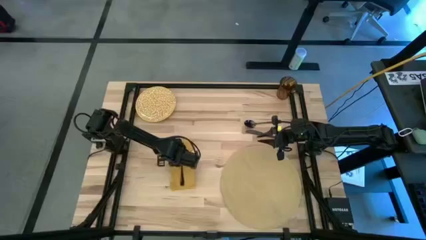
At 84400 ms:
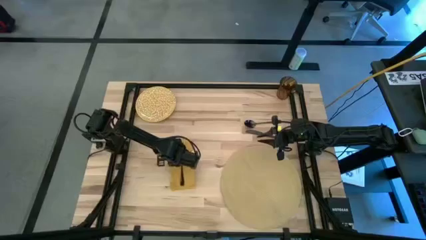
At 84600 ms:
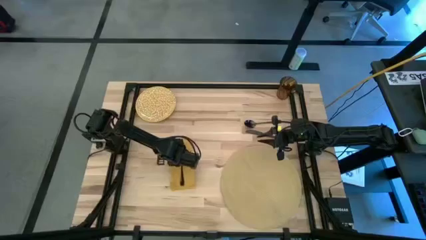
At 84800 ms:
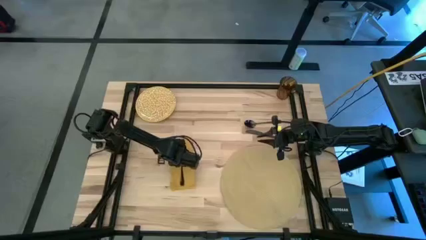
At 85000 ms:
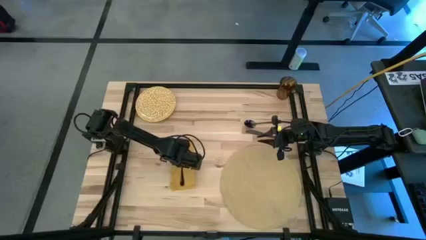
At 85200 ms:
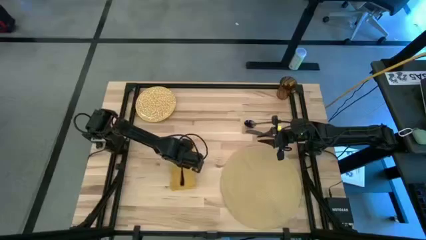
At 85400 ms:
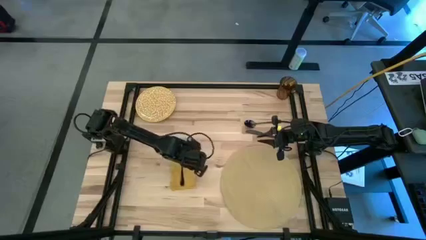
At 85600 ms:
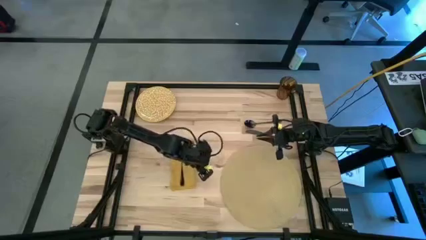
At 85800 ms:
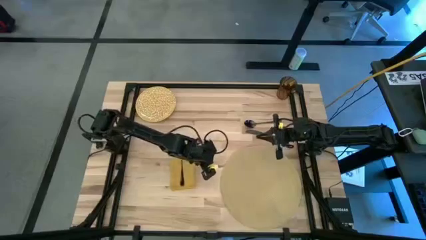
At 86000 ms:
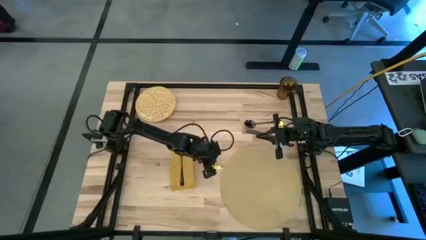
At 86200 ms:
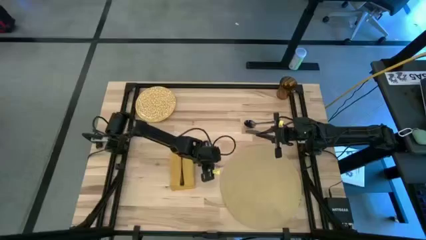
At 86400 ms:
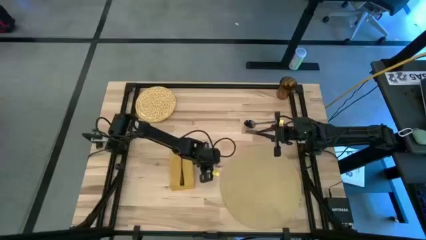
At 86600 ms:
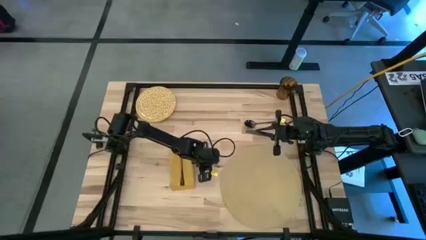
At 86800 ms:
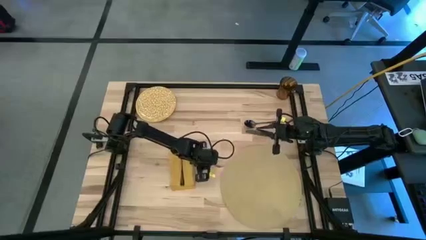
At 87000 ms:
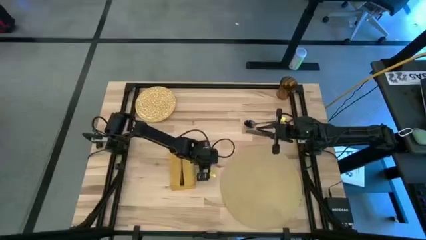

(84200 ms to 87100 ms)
Task: Set table place
Move the yellow placemat to the right of the yellow table napkin

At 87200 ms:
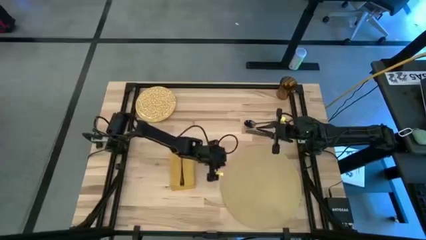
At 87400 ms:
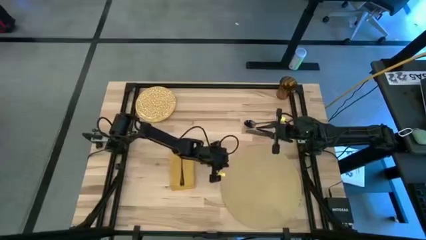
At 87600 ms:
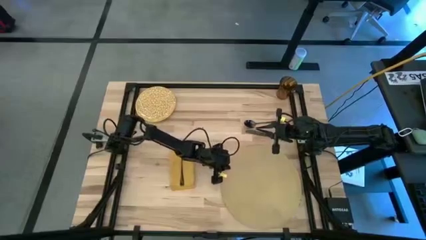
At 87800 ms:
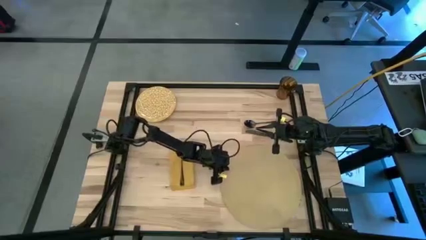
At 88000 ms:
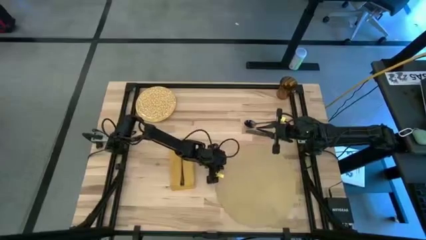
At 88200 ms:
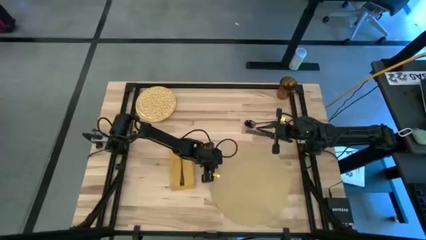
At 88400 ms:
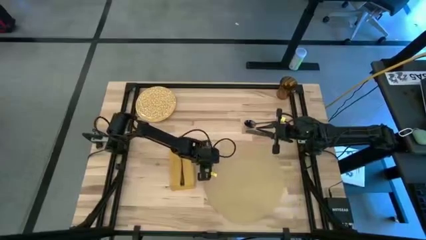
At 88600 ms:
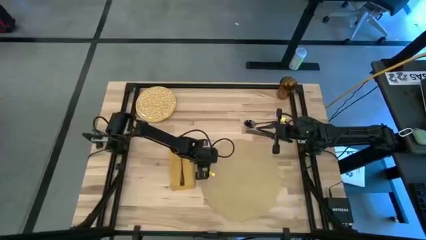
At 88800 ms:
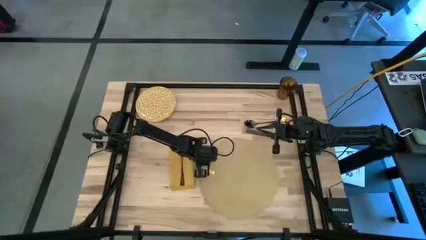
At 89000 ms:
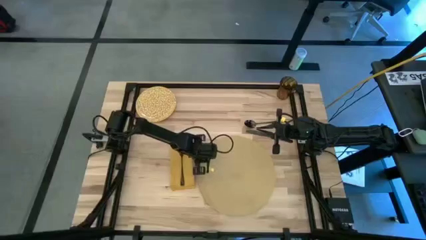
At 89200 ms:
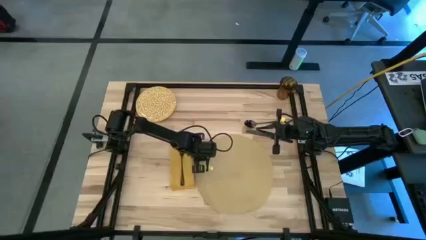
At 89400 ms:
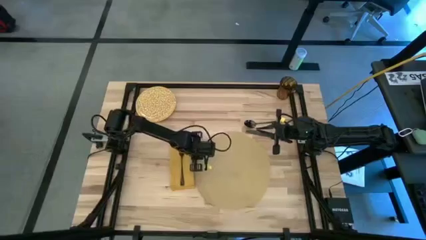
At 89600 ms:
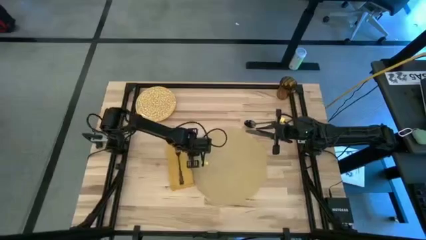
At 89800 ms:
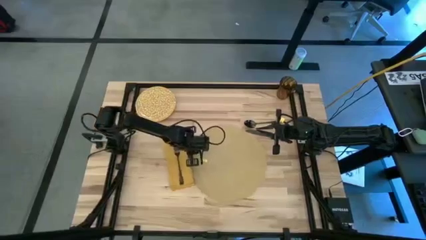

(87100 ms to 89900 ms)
Move the yellow placemat to the right of the yellow table napkin

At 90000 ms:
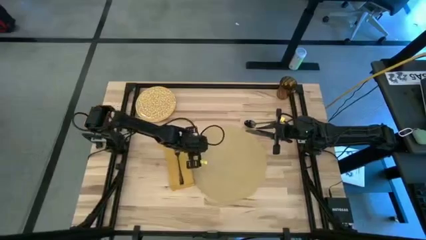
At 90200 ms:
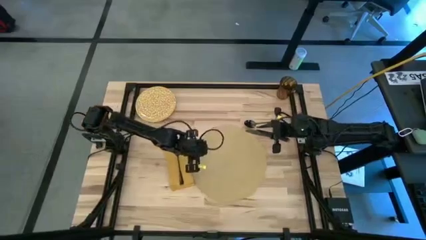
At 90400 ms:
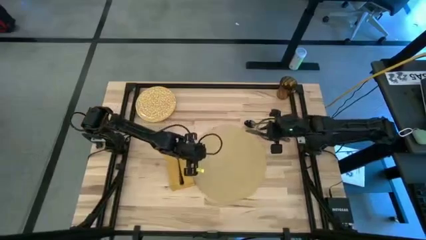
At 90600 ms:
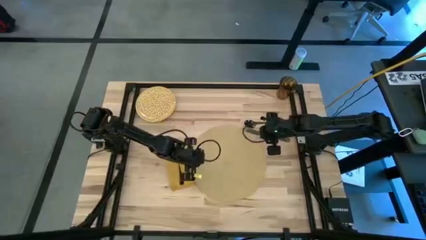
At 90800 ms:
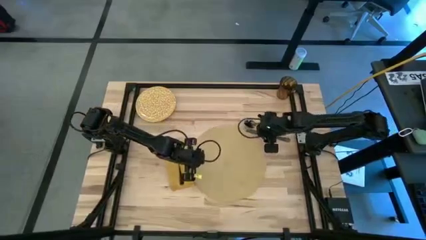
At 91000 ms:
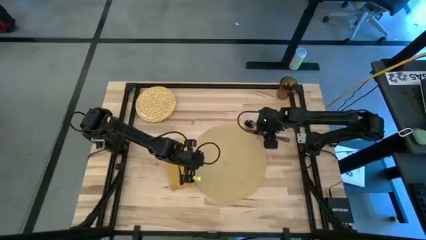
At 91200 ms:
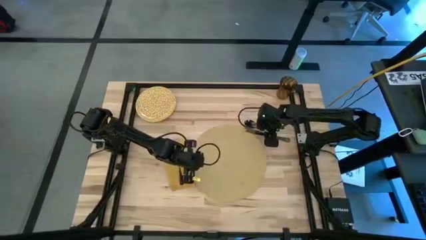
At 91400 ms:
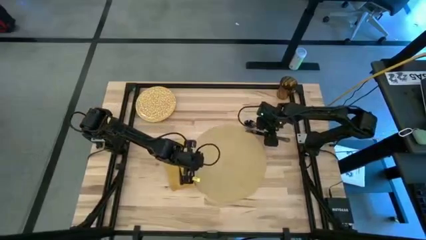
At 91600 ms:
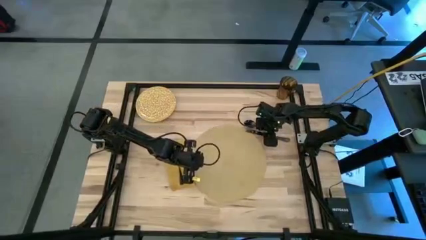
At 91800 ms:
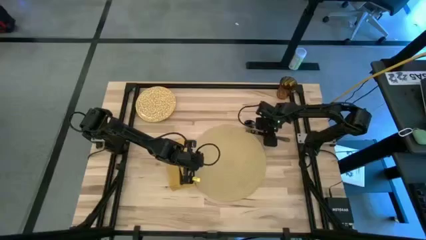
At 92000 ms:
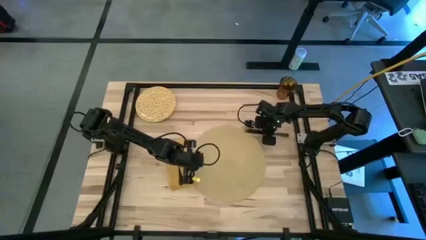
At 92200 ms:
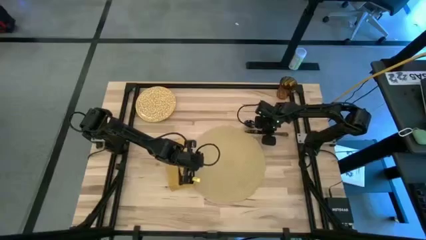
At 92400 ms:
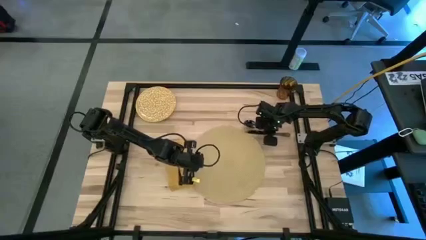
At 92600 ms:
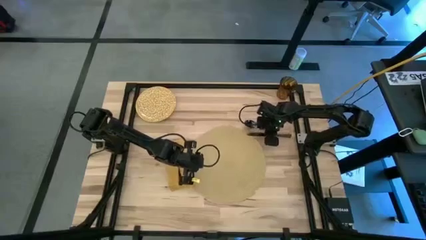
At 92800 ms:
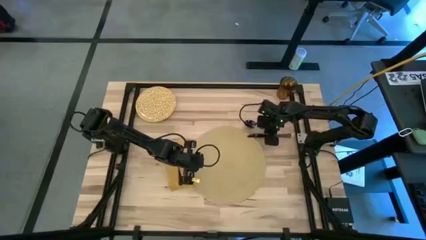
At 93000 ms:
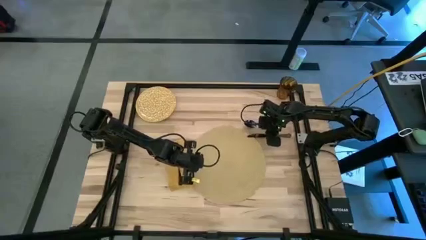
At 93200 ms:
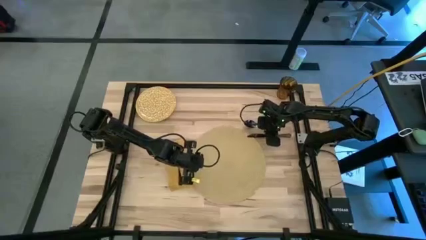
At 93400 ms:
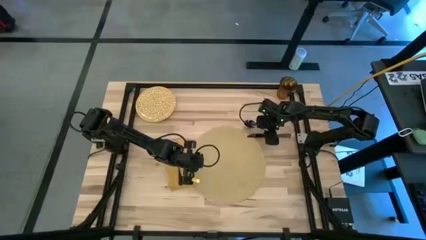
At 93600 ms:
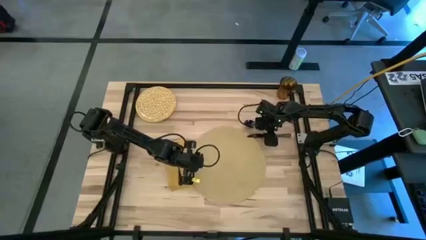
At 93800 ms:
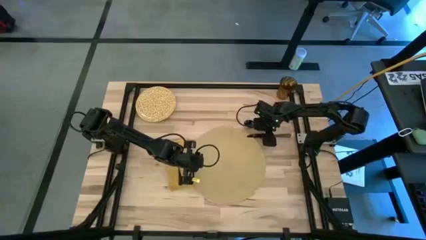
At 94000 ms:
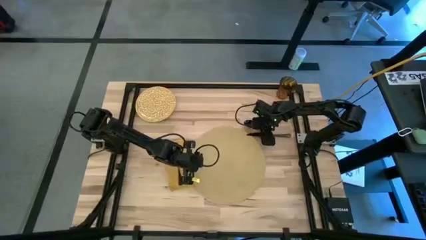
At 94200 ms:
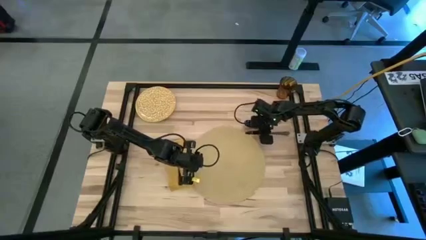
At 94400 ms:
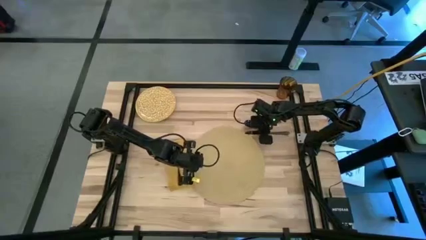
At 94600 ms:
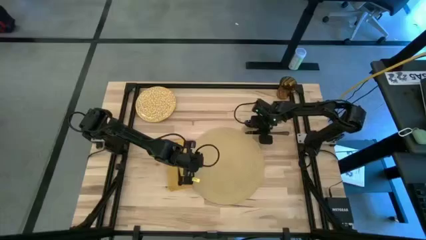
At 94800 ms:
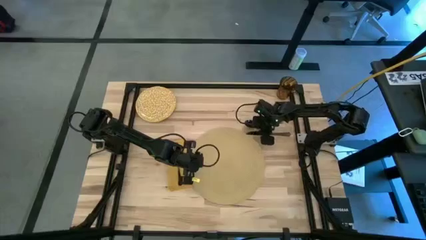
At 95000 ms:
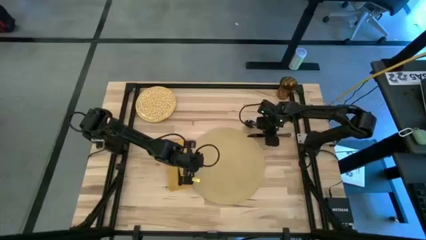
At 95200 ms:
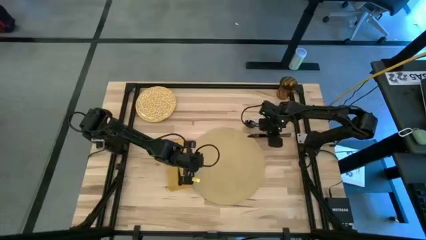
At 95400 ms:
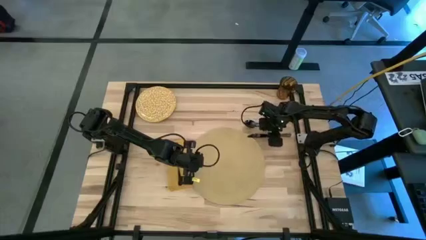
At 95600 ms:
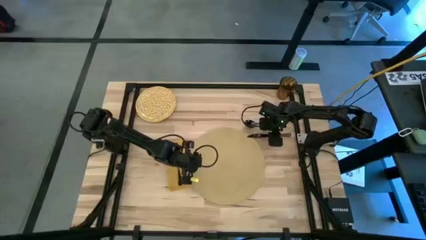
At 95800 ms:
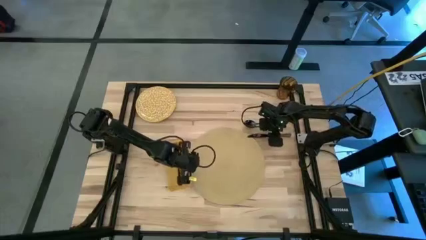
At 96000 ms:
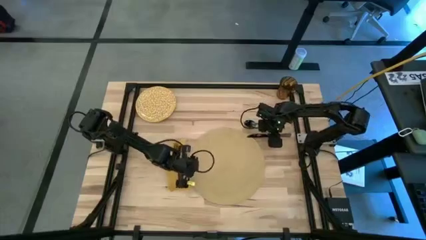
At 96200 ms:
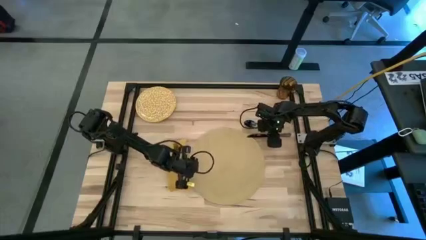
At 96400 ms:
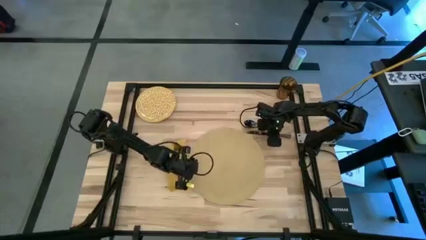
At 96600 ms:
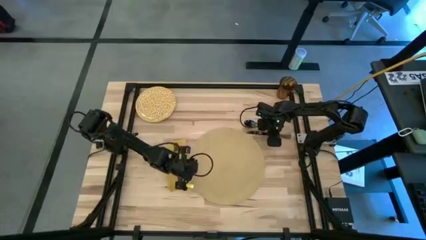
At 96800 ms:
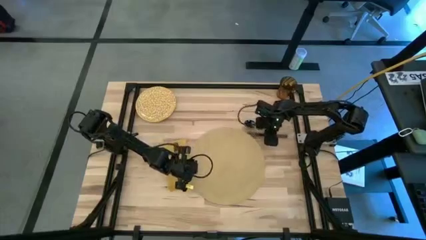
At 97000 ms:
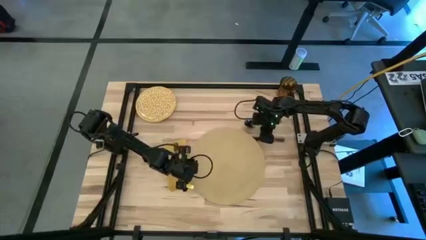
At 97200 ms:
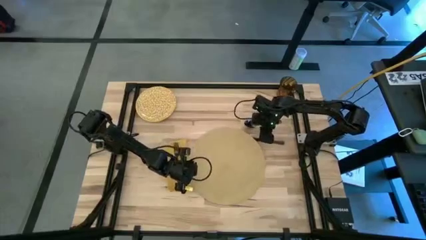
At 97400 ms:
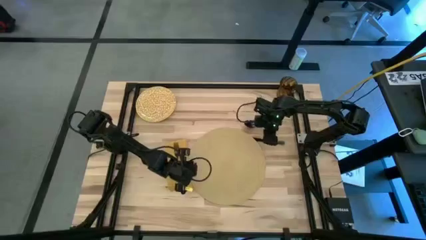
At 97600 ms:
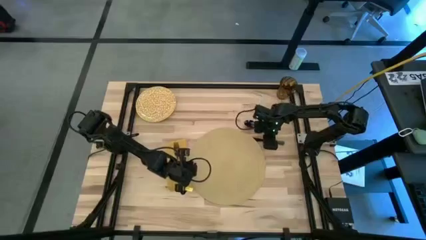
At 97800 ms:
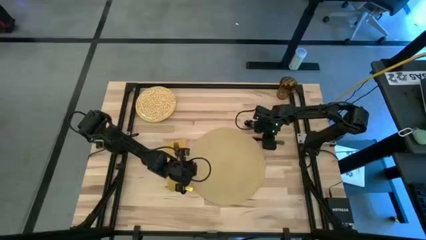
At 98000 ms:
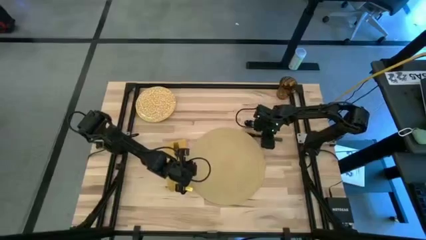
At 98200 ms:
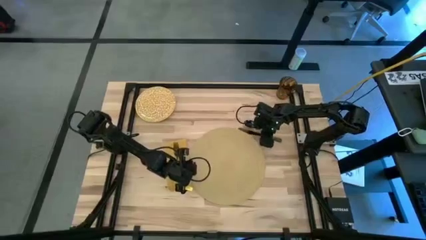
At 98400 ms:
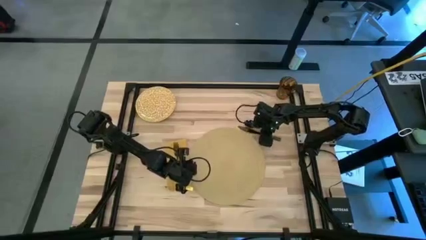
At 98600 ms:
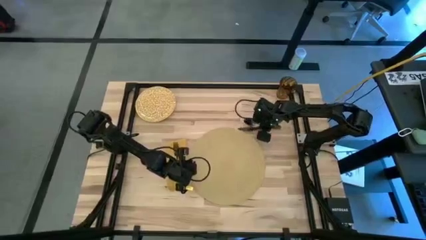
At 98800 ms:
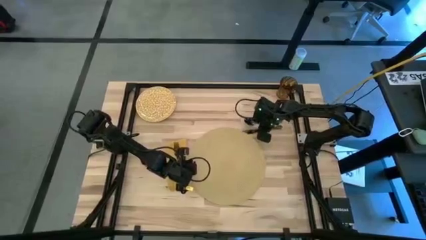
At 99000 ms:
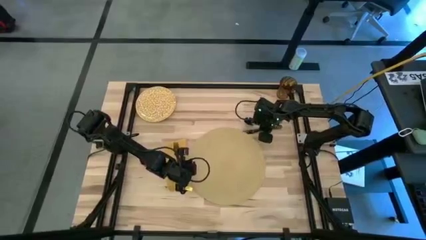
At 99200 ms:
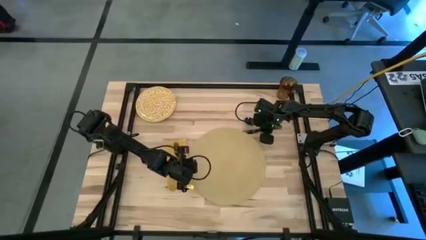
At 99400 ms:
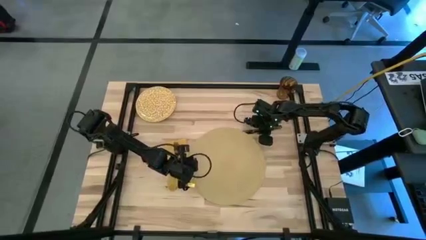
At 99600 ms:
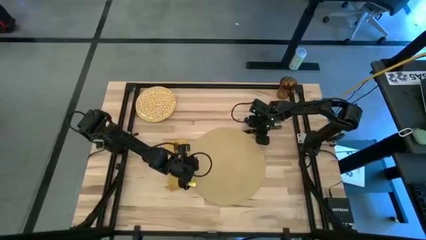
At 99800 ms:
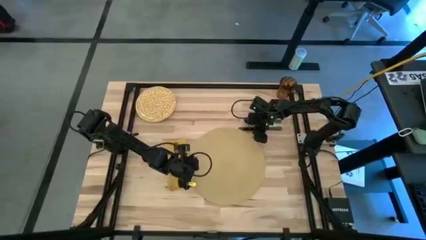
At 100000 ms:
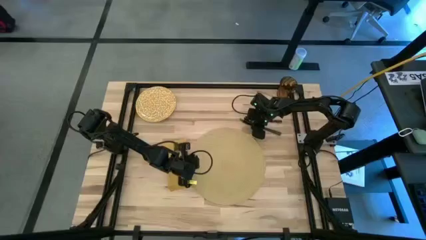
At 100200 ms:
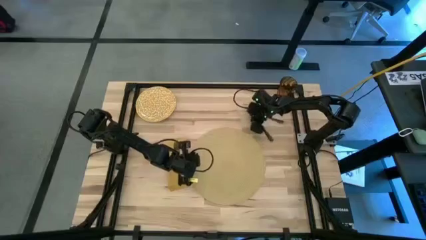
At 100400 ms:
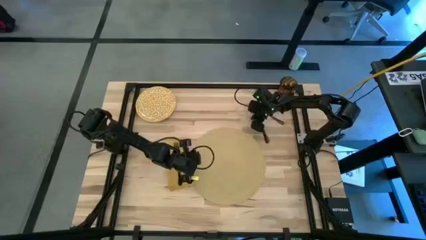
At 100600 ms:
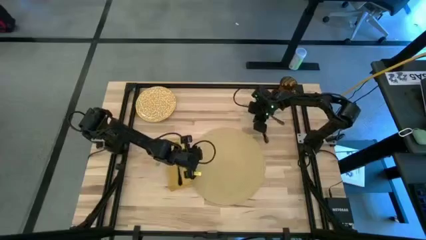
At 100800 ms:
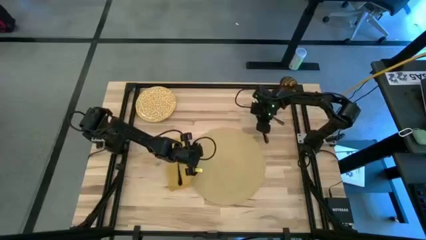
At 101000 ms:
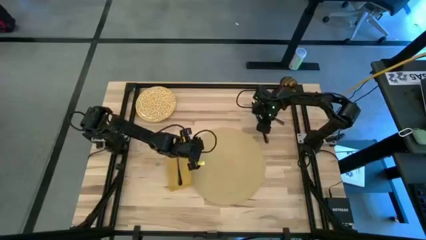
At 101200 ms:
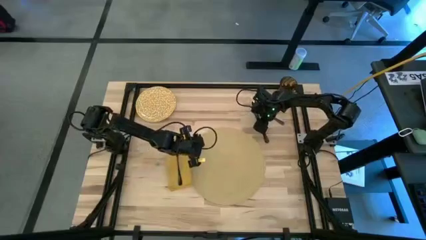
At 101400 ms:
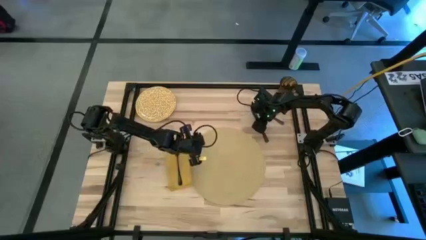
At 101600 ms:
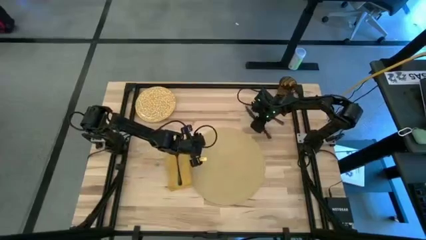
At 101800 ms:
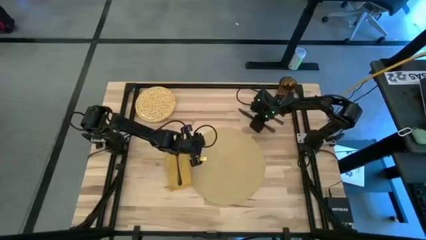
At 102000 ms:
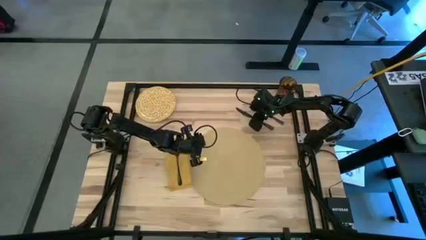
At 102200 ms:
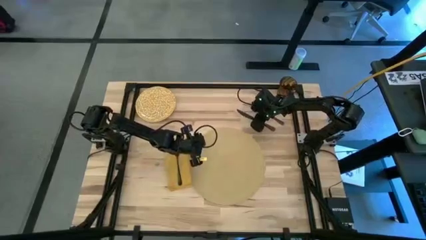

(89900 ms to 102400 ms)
Put the black table knife on the right of the yellow placemat
